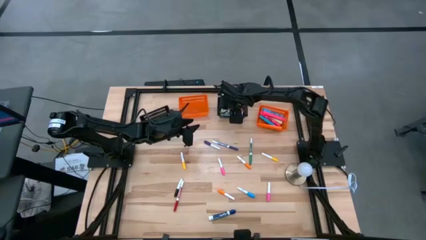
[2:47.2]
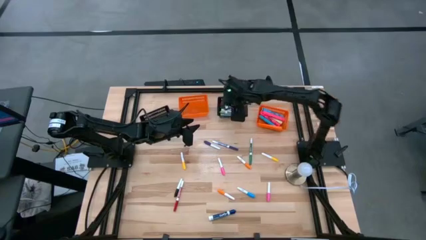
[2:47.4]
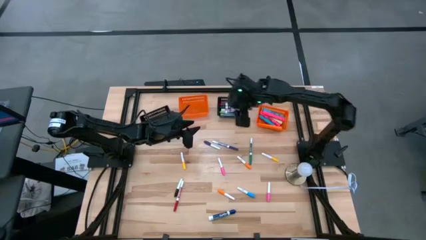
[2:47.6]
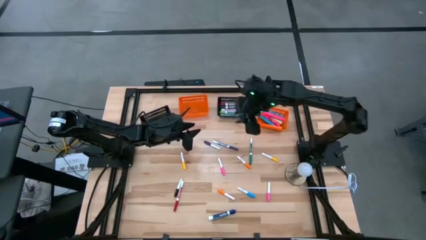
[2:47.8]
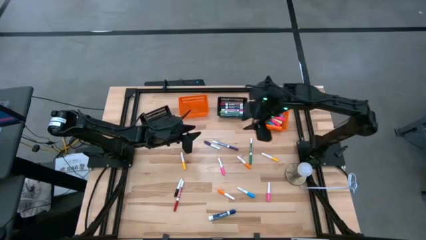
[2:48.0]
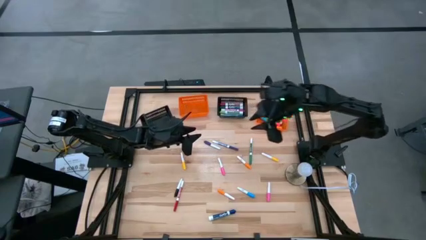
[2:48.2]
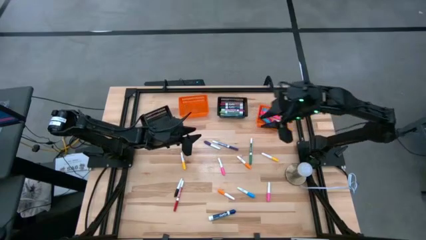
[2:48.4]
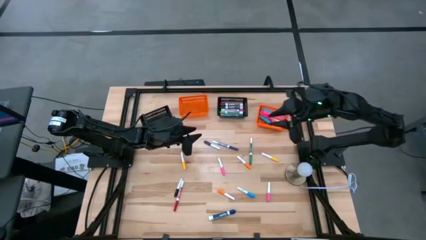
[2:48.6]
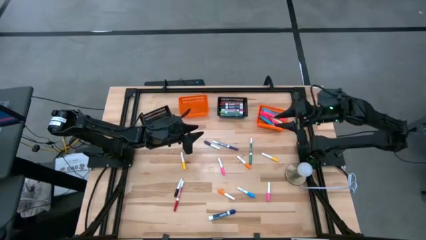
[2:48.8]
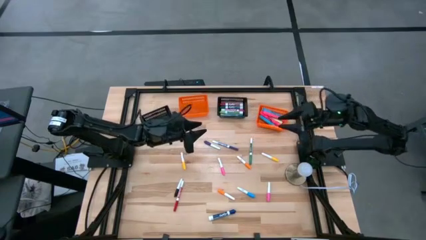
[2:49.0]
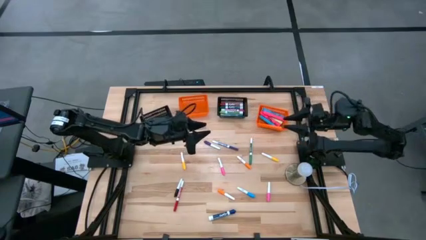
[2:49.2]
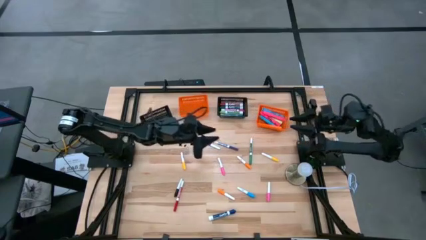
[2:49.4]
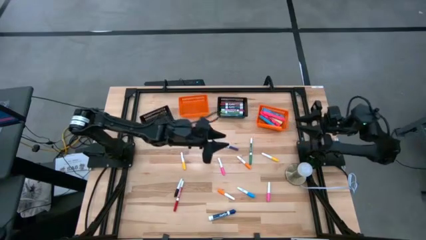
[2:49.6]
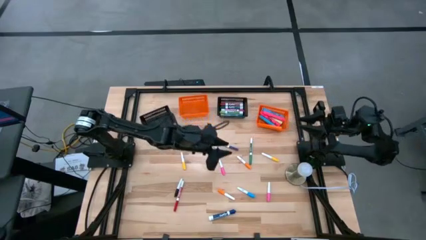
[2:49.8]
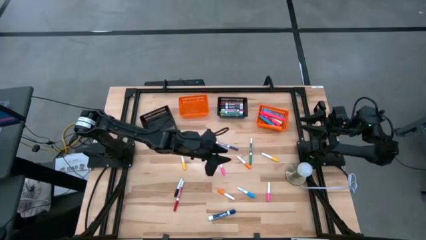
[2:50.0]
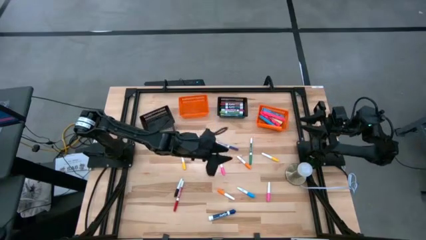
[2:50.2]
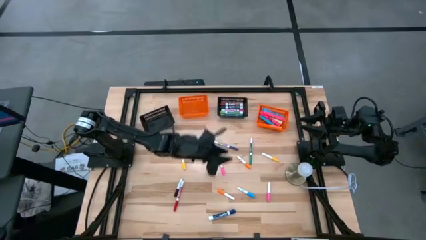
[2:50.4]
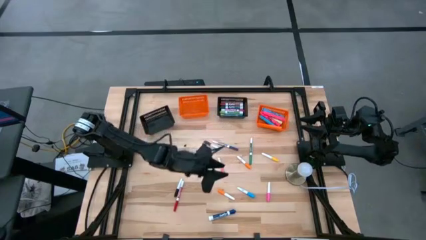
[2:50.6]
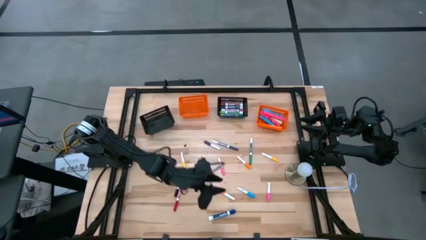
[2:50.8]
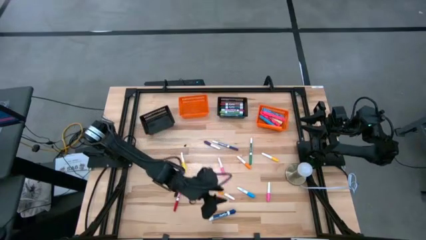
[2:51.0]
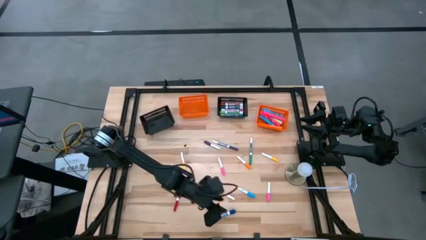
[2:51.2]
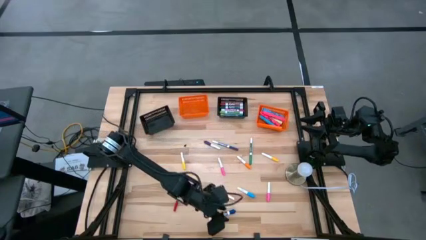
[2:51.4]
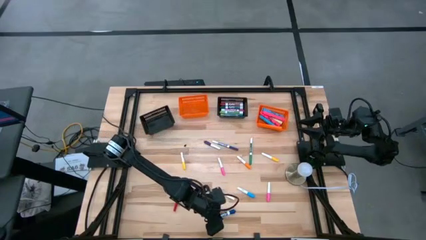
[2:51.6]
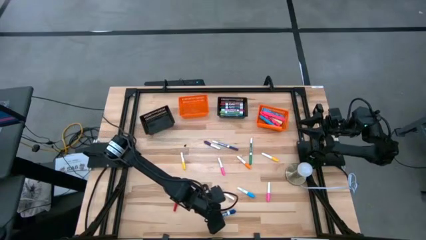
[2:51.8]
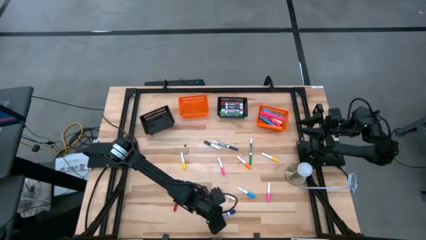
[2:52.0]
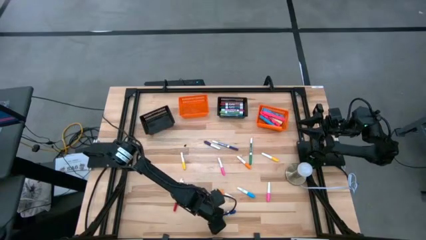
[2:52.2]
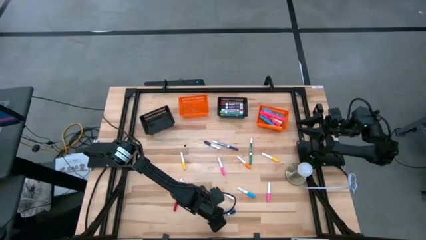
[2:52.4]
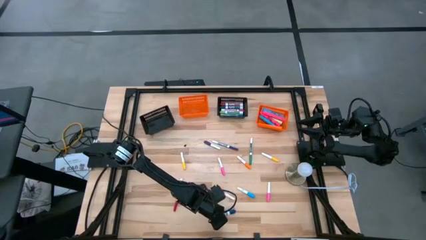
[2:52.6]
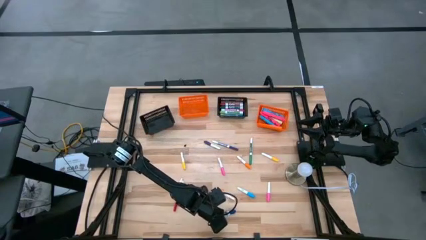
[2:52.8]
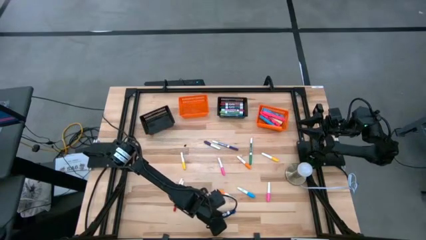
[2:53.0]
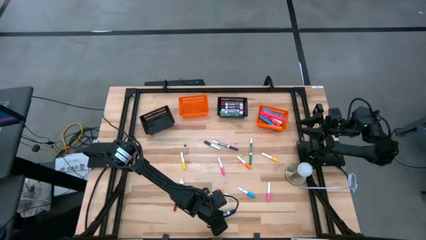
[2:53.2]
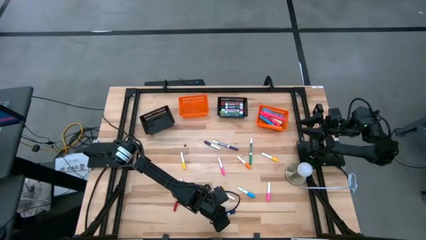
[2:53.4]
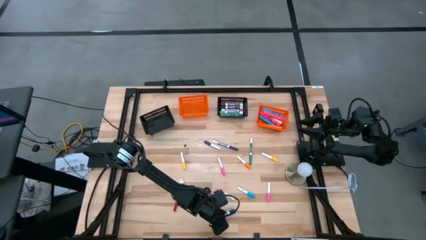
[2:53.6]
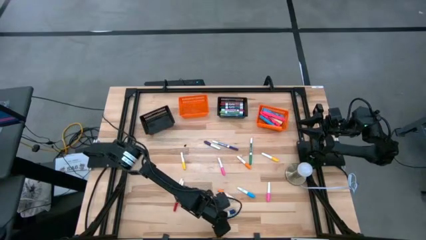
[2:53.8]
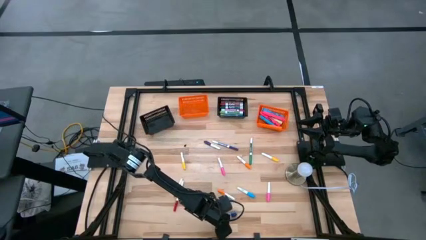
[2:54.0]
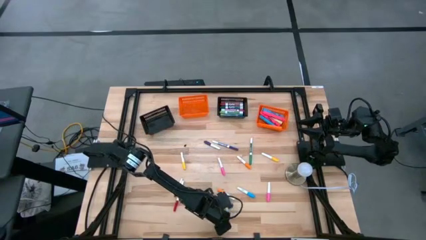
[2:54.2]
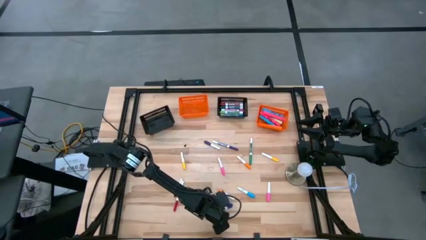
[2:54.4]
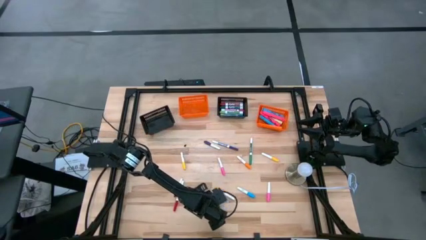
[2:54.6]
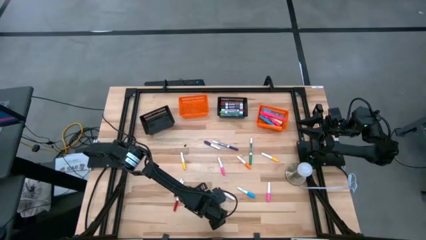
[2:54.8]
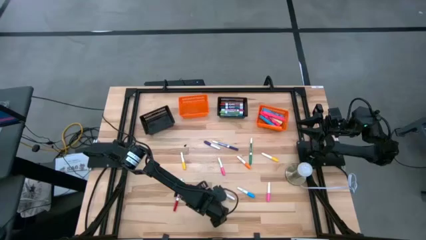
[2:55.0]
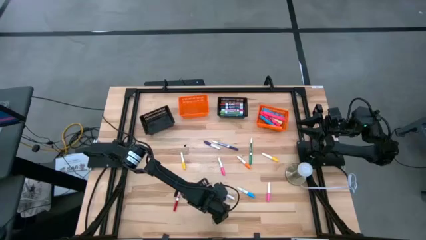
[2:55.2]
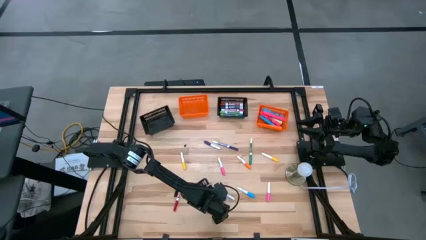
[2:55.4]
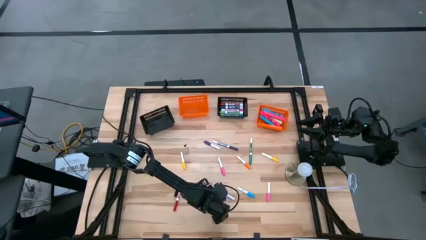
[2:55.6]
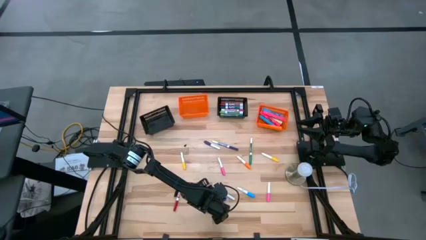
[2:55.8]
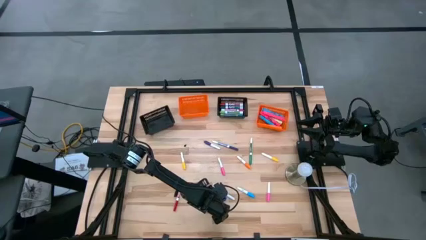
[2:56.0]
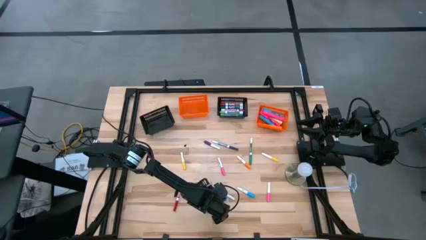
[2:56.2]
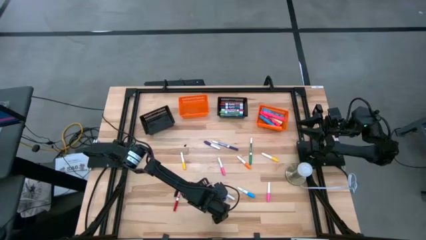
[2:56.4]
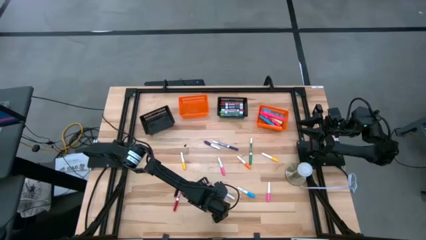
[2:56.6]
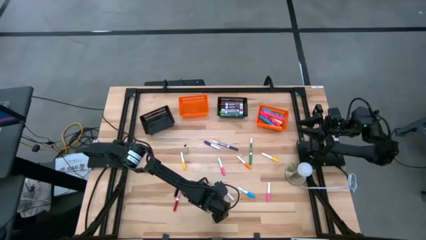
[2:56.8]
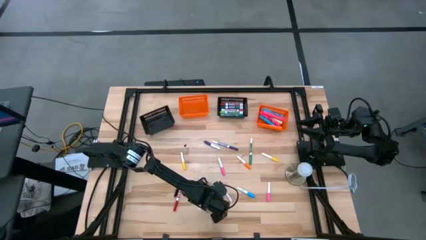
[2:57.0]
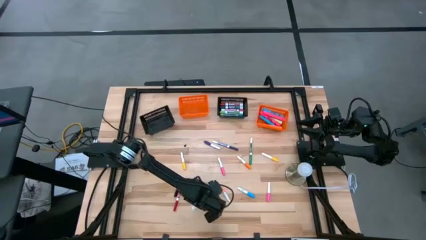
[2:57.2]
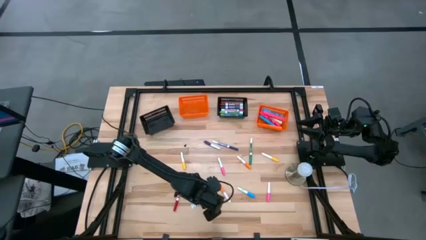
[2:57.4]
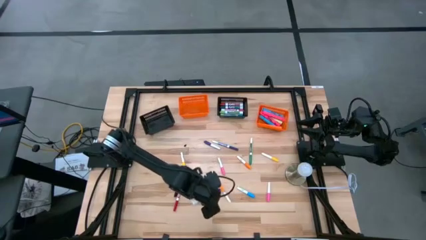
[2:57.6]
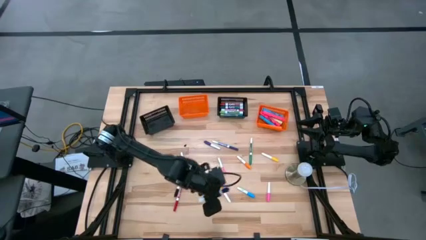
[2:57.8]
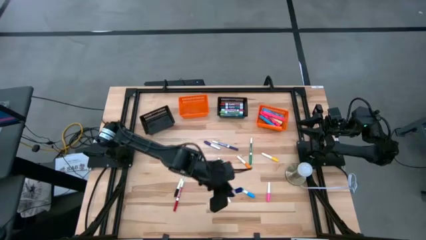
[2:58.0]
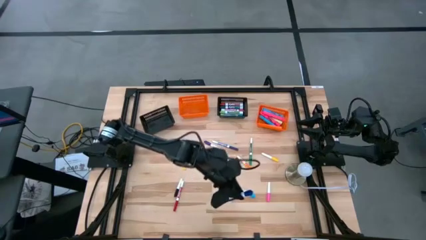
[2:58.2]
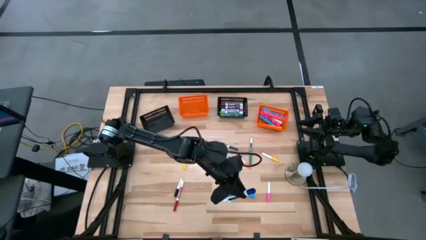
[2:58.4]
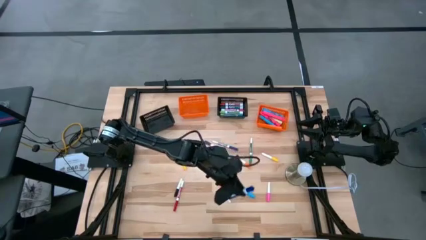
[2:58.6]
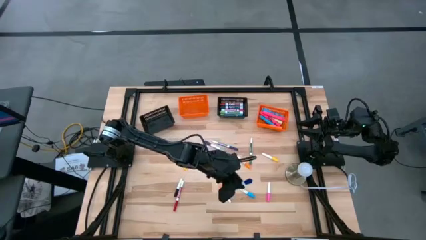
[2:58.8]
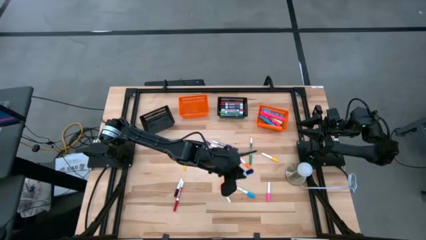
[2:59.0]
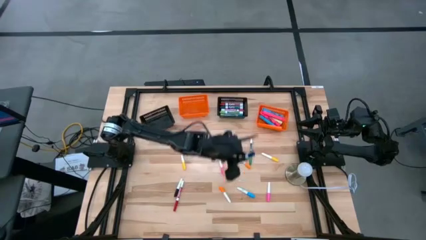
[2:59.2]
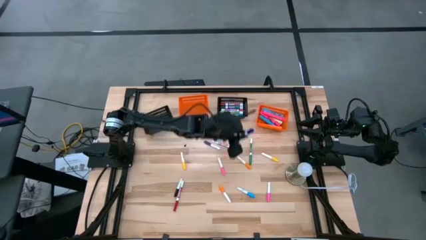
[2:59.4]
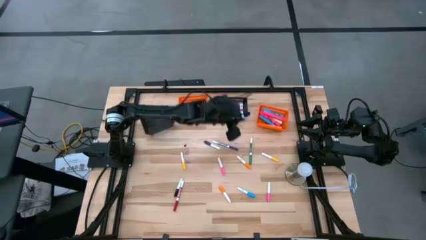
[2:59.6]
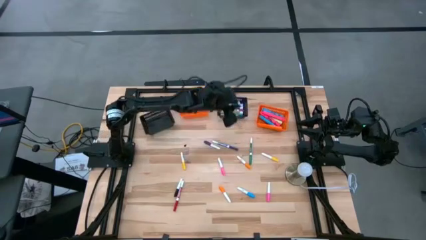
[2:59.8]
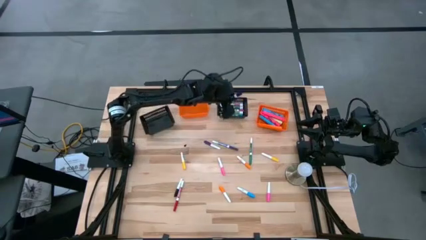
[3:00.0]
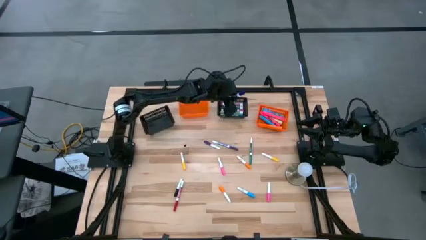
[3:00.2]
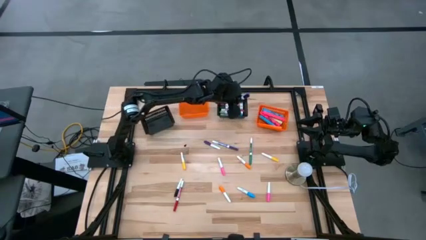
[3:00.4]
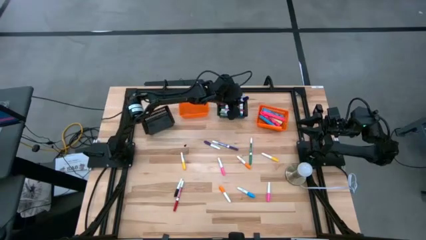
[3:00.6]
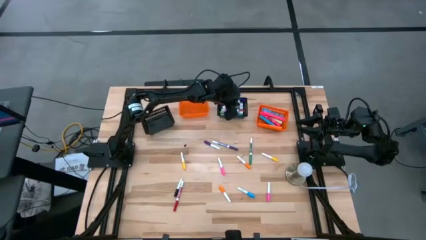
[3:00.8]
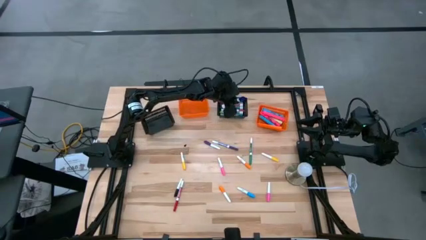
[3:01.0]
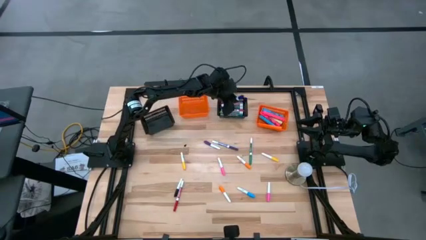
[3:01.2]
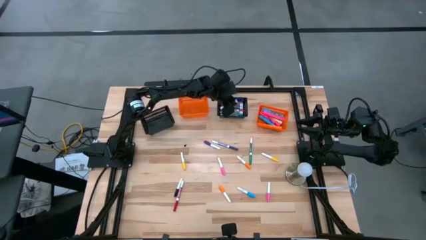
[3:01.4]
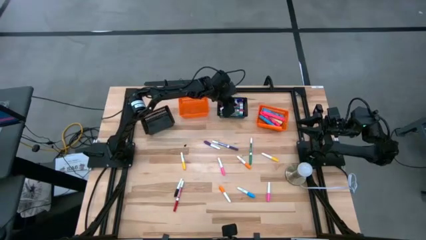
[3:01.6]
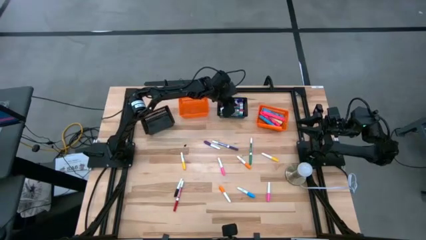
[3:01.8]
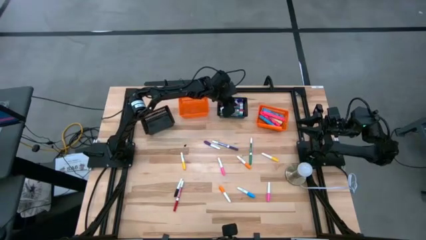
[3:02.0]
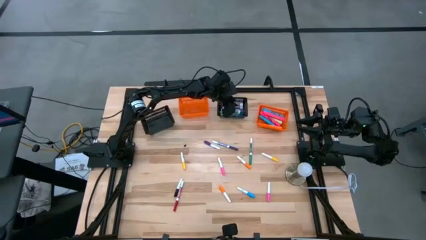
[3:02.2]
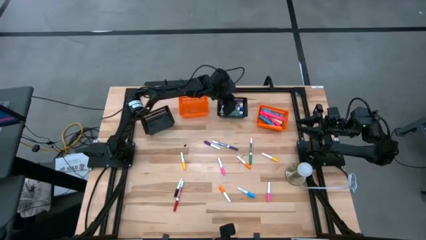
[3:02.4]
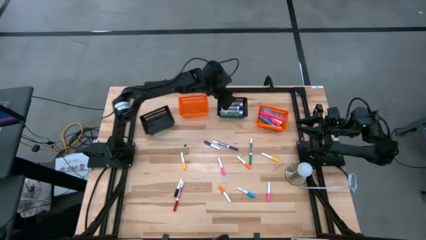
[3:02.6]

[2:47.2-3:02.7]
Task: Pick & Place Markers
Put the white blue marker into the middle black bin

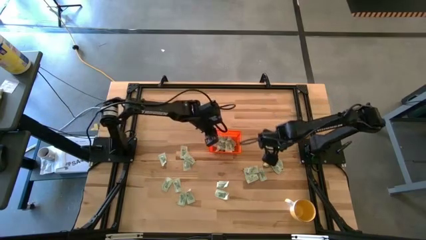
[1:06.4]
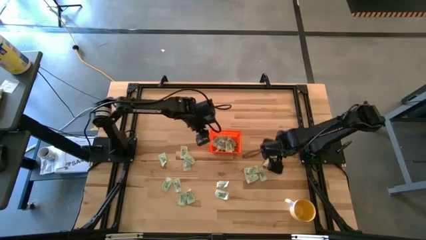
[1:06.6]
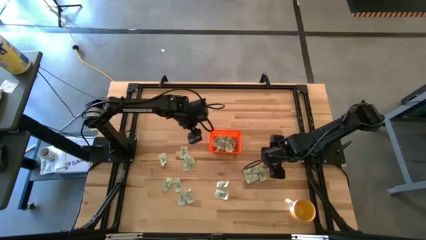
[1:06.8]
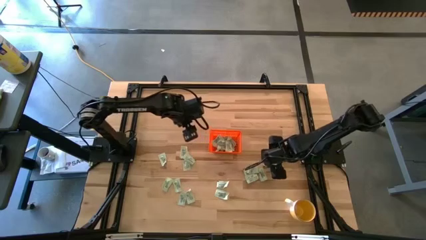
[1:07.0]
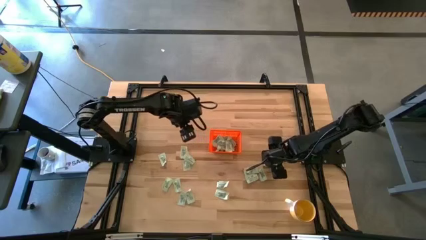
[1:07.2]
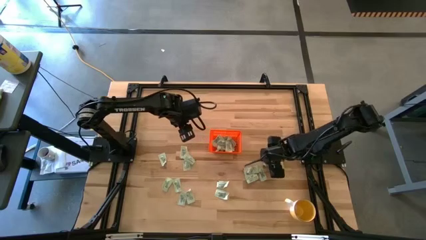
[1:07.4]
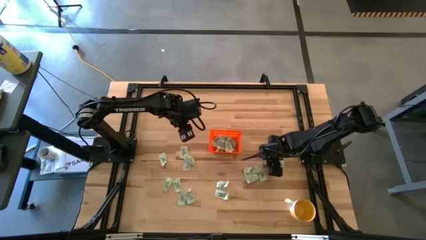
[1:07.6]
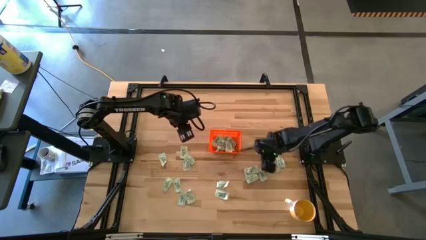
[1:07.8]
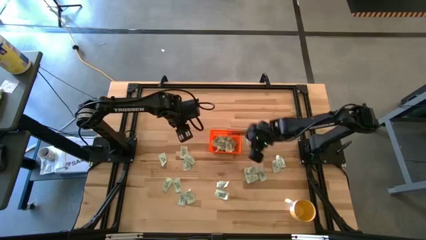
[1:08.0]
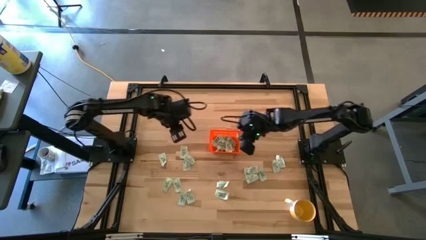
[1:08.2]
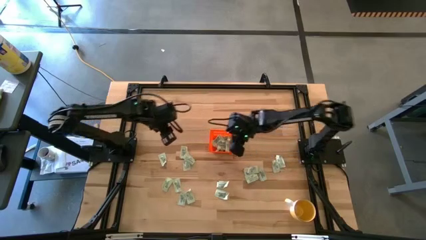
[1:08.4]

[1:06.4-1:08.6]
Task: Pick and place Stevia / Truvia into bins
Put the light green stevia packet into the orange basket
